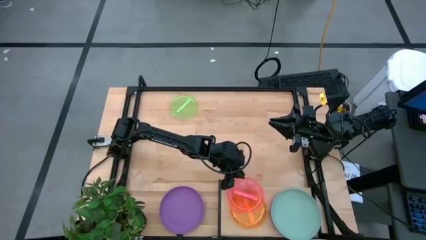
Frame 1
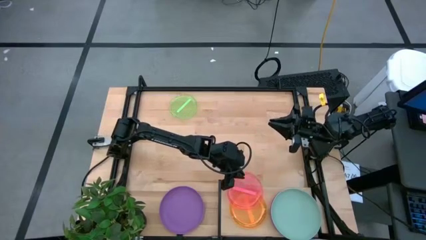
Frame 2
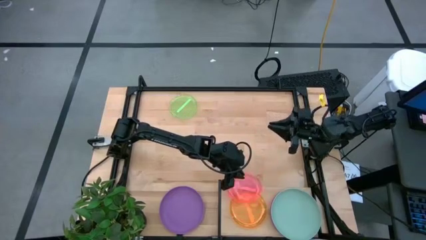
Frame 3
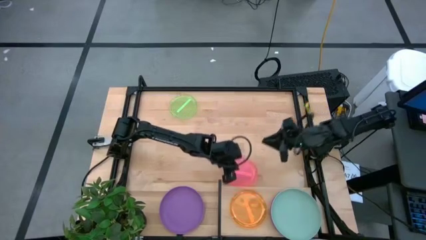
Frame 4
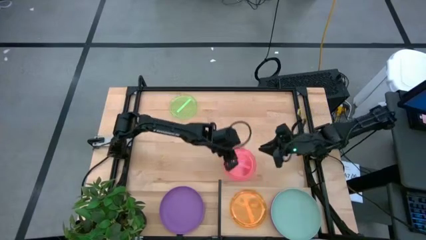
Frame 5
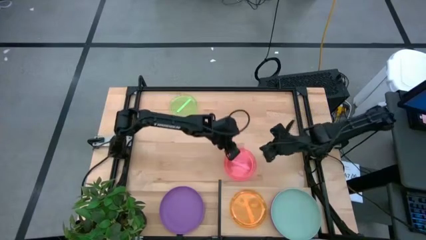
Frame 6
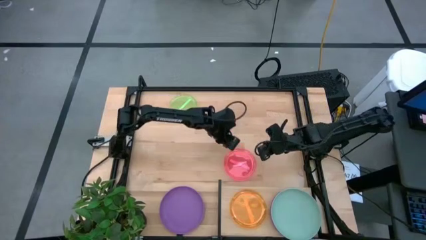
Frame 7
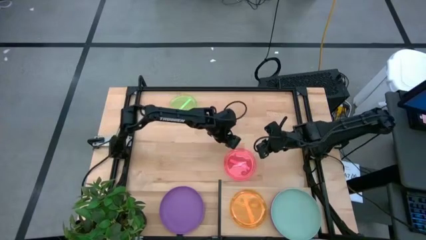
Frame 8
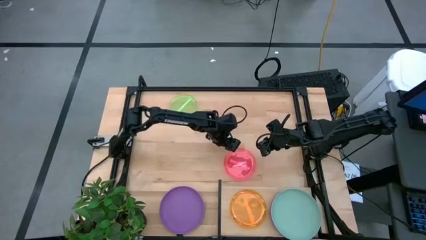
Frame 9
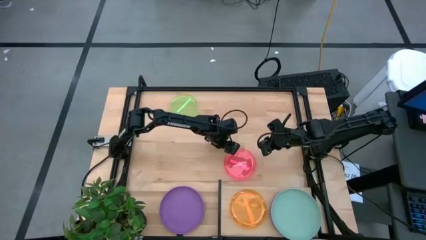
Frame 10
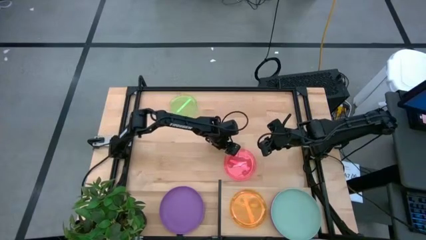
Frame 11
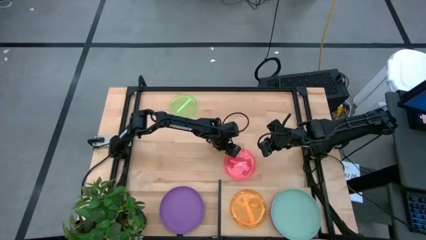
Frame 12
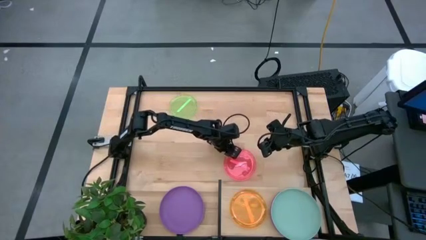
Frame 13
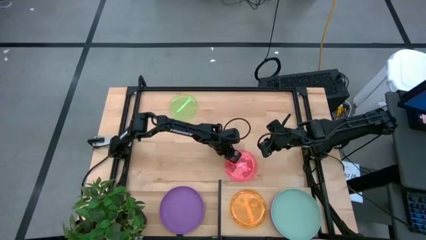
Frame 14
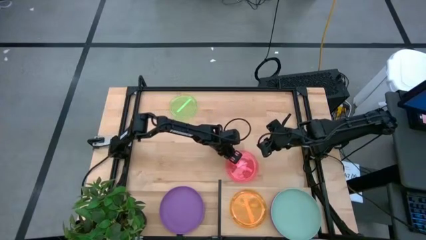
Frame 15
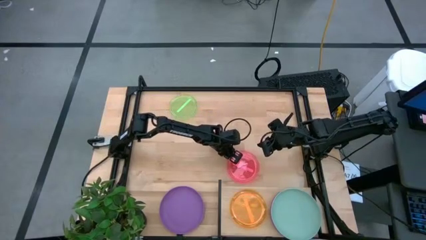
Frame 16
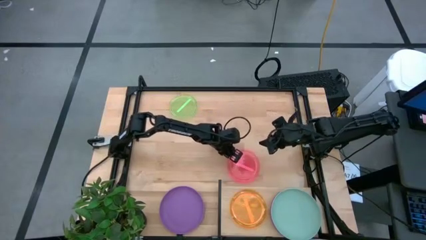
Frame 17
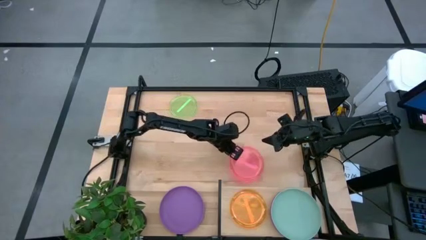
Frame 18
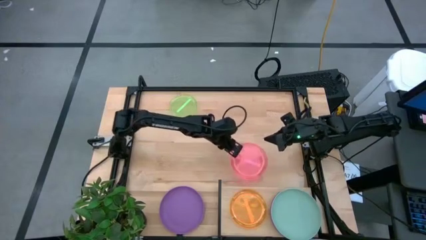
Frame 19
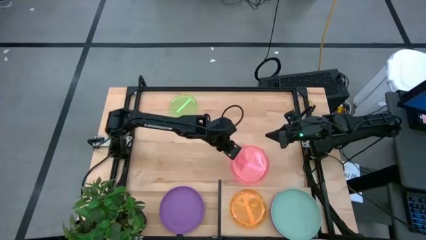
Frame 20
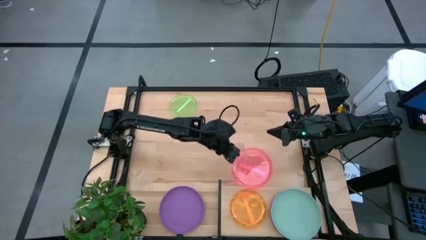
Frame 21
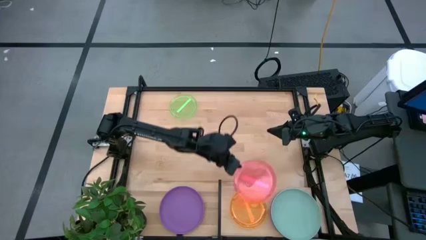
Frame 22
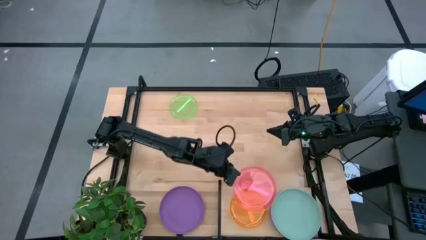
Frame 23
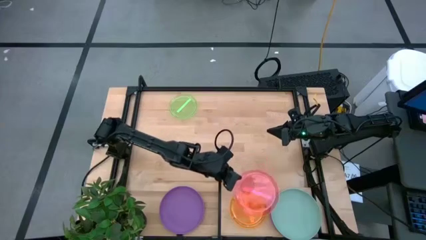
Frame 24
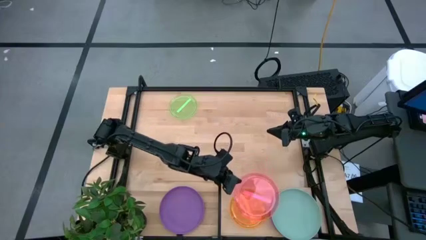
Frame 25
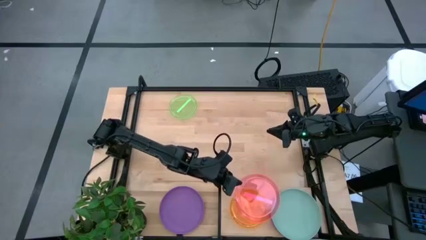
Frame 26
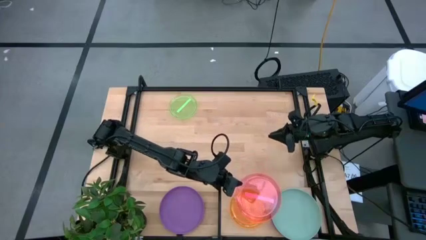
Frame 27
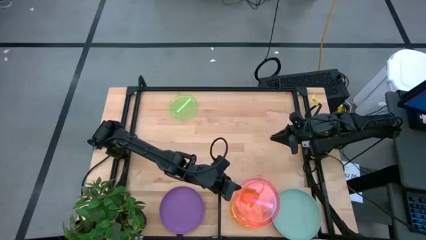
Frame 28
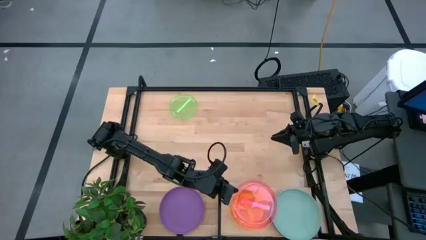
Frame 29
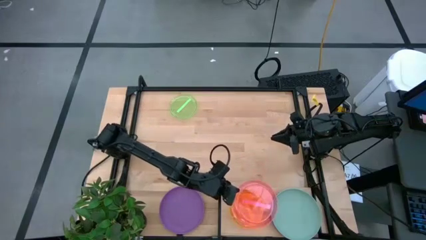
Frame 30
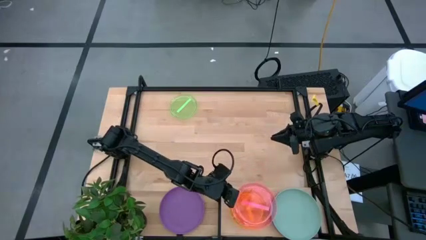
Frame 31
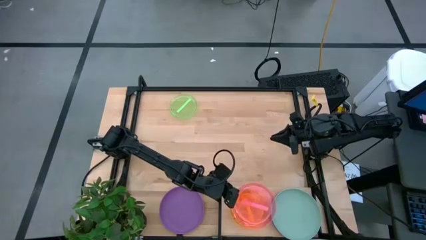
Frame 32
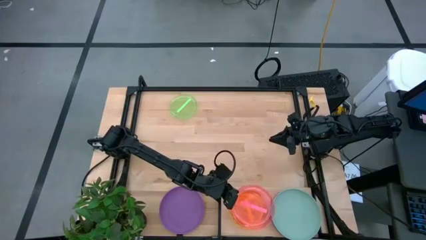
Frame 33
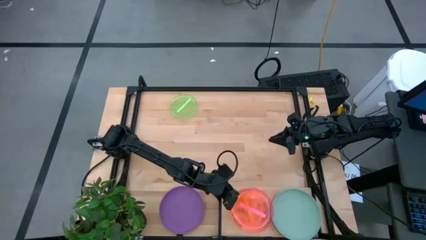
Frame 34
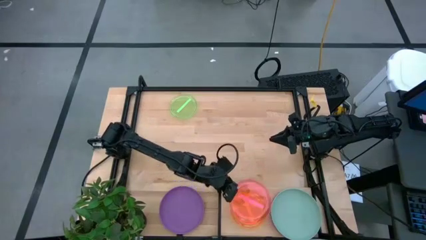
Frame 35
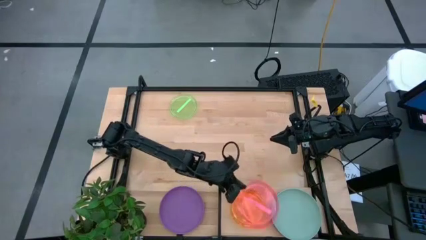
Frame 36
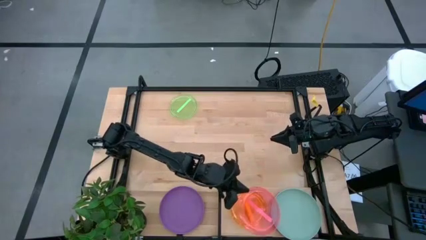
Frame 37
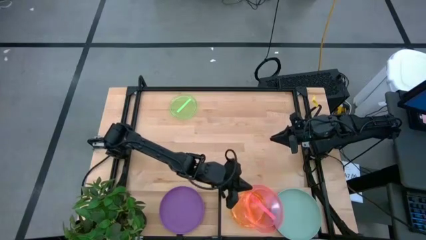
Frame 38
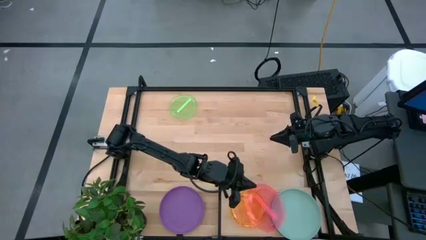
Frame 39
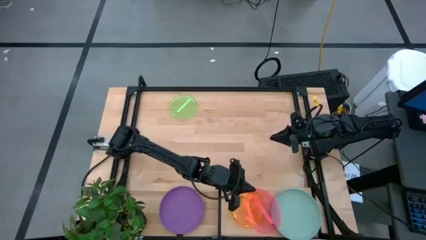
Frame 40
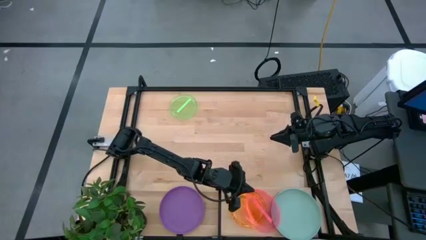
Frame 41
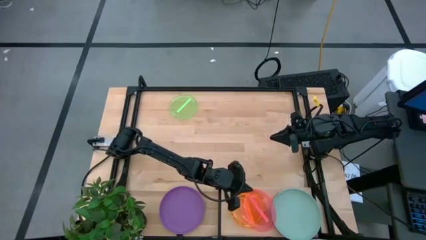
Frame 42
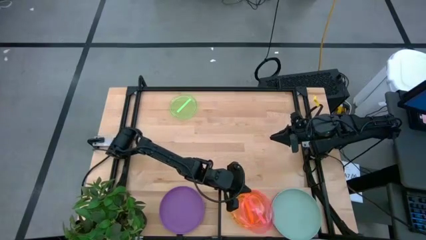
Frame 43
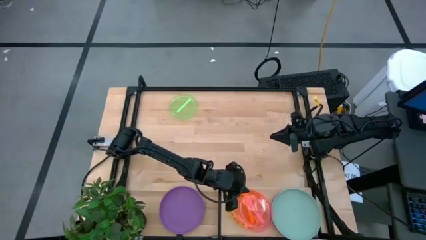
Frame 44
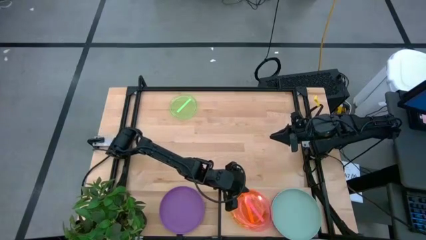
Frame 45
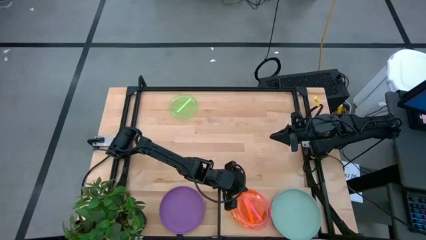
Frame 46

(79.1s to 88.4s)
Task: Place and stack plates onto a shelf
Stack the red plate on top of the orange plate on the shelf

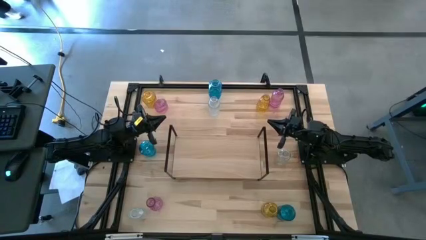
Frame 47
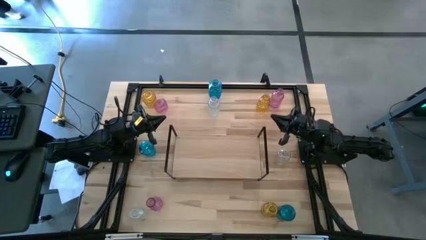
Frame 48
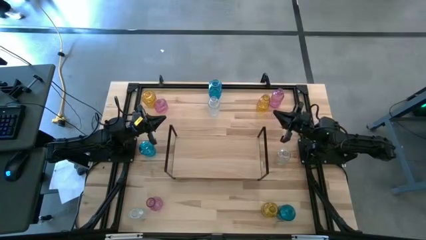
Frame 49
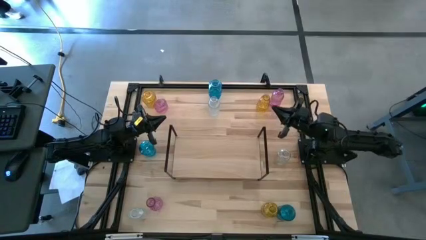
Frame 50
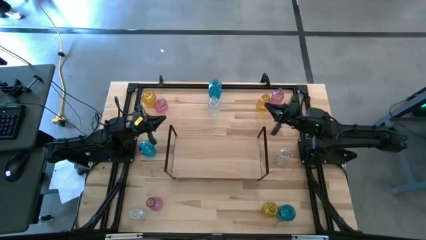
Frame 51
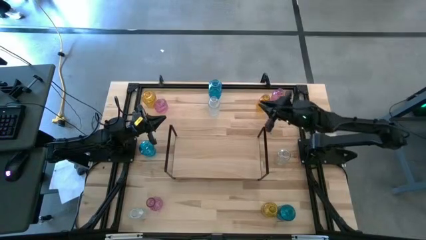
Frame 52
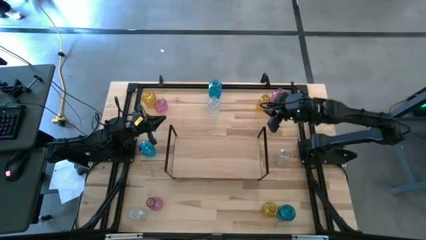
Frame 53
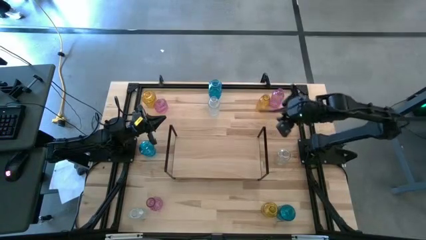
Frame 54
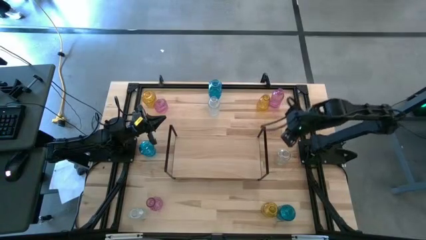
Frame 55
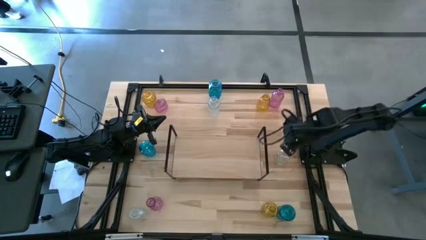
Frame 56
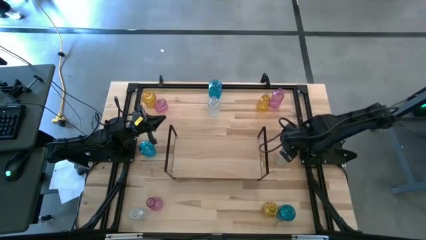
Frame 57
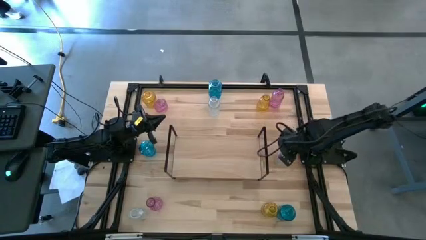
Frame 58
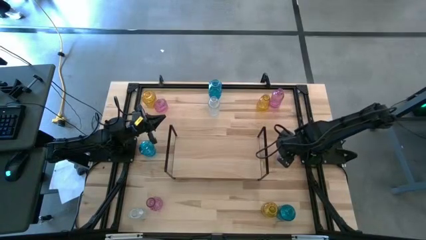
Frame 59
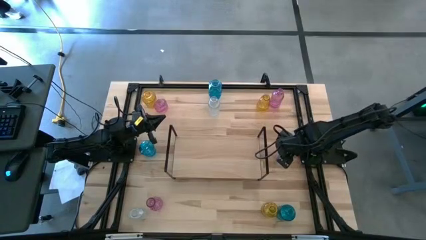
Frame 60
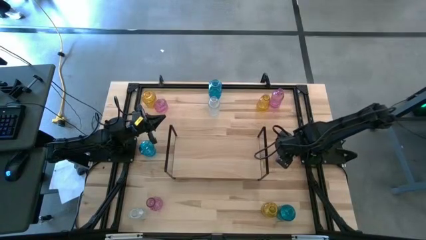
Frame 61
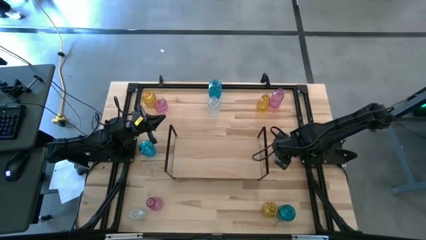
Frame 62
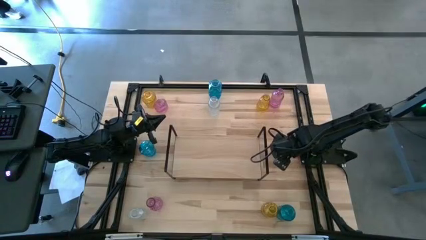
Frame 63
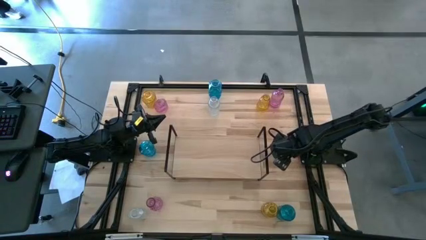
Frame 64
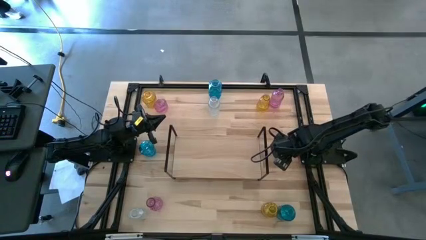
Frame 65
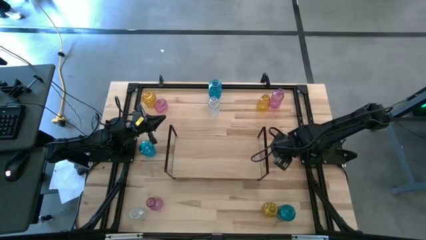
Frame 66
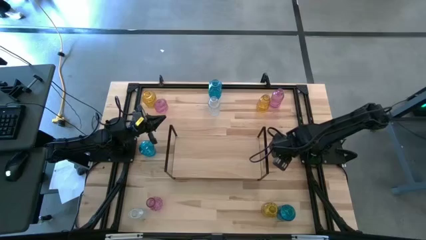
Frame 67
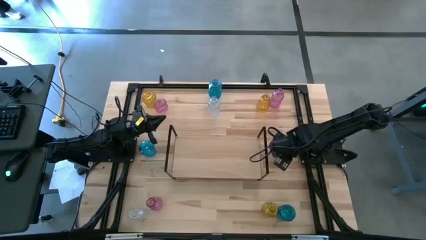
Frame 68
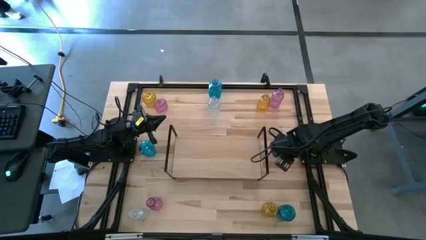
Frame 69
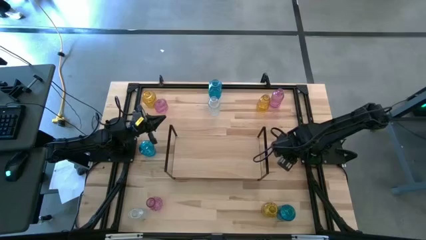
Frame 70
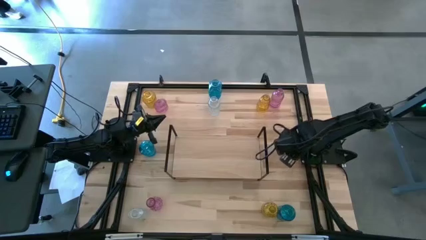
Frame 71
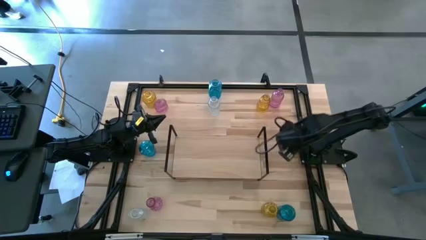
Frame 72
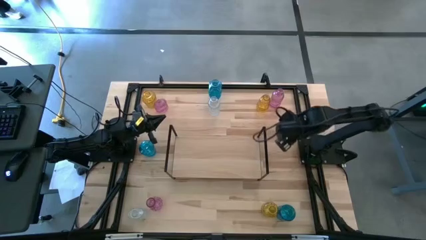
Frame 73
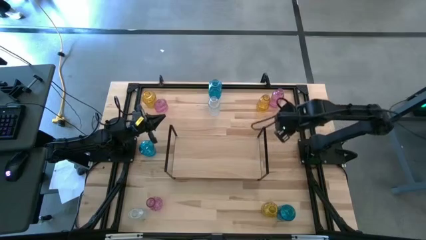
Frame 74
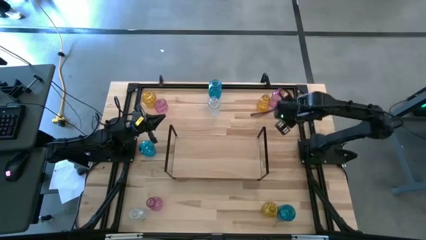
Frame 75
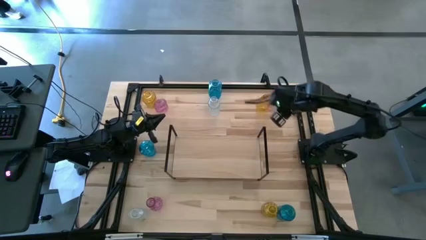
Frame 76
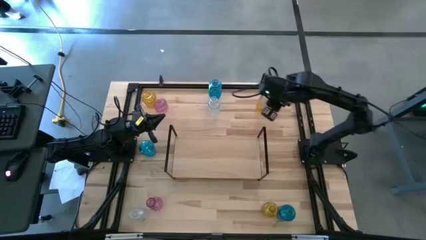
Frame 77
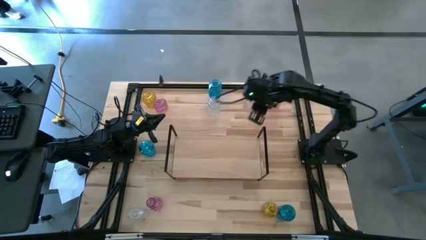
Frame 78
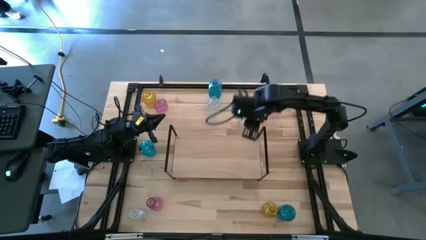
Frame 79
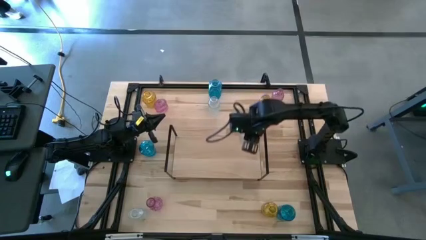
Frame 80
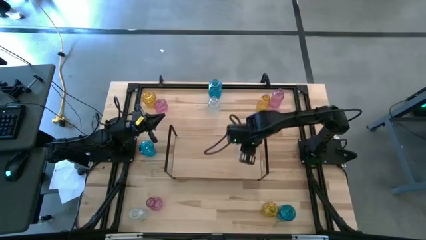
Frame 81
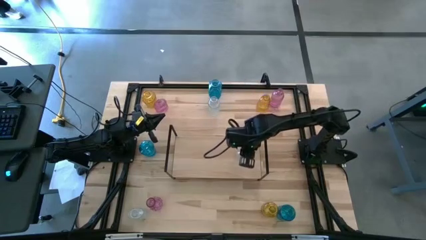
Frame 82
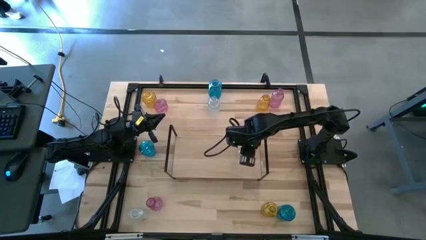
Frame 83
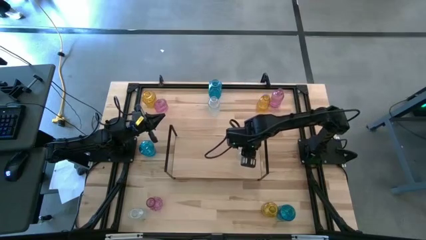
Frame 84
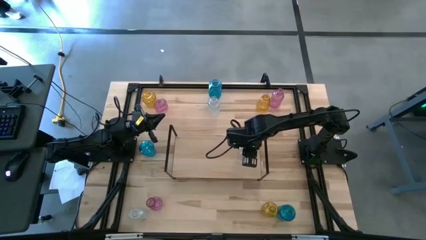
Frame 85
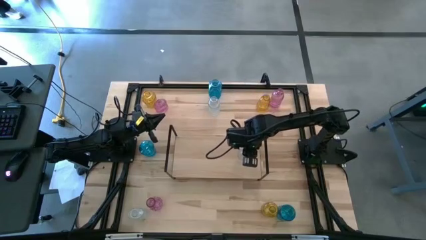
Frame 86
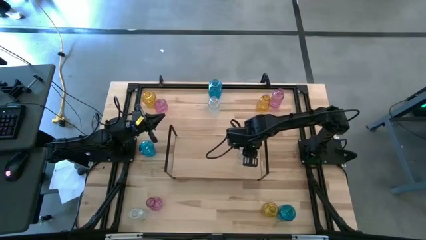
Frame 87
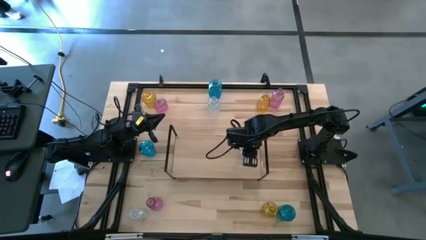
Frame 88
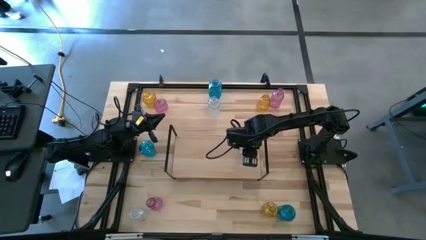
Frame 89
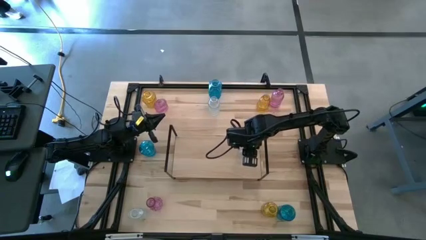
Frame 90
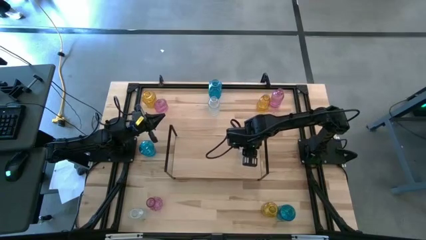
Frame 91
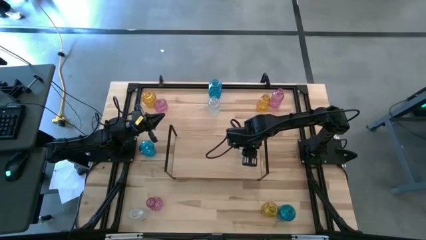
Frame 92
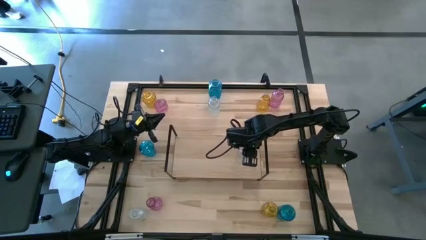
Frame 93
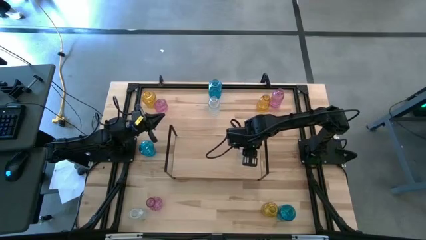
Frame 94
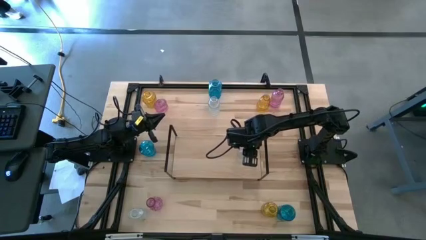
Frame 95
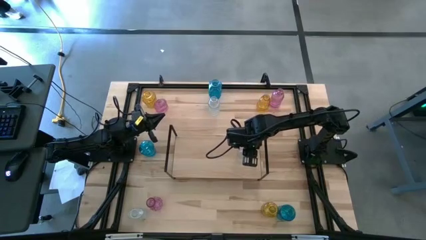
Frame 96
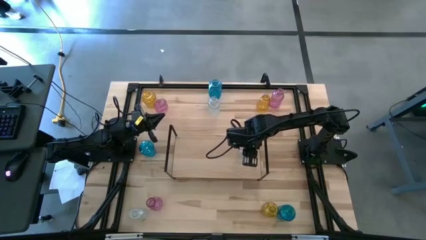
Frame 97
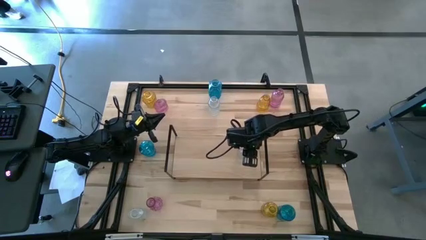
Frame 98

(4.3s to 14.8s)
Task: sort vases onto shelf
Put the middle right transparent vase on the shelf
